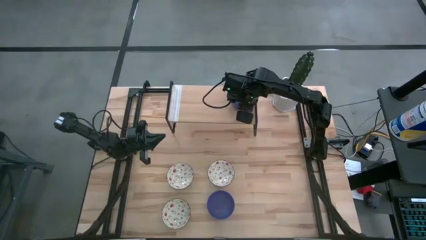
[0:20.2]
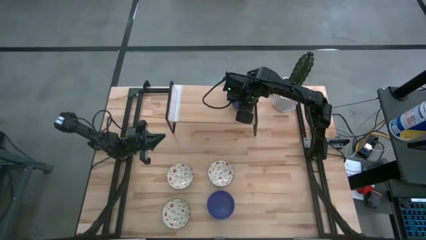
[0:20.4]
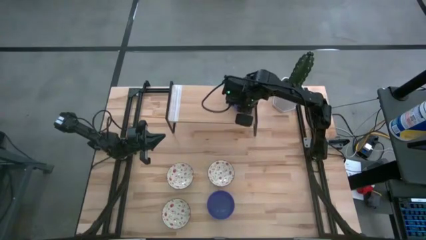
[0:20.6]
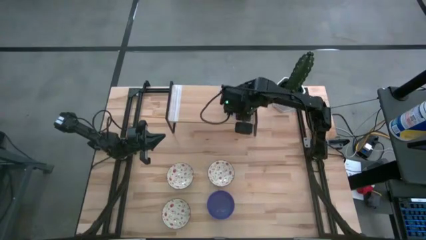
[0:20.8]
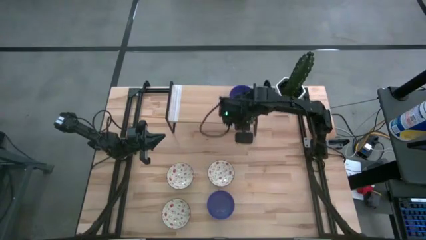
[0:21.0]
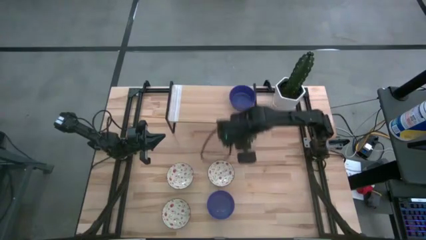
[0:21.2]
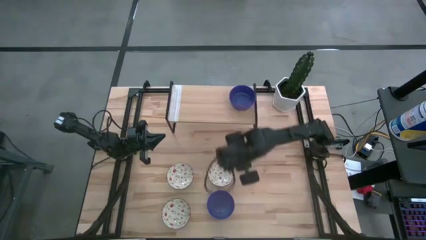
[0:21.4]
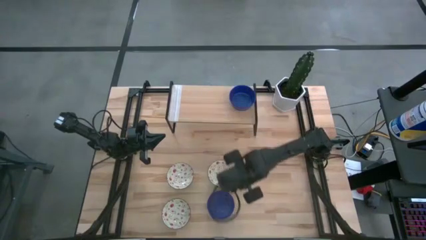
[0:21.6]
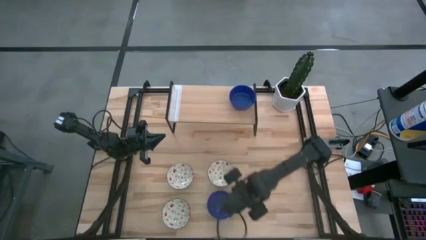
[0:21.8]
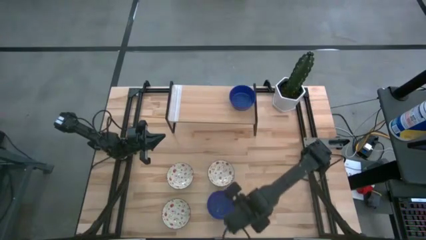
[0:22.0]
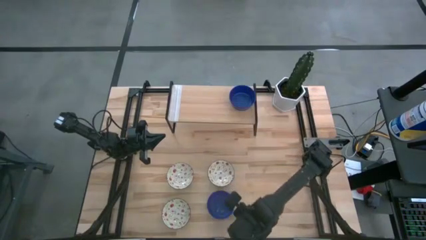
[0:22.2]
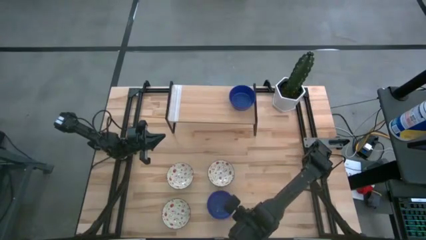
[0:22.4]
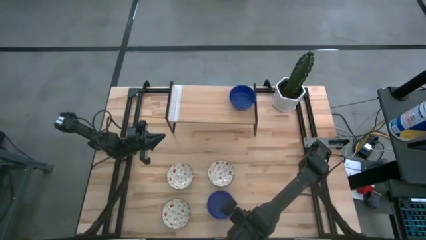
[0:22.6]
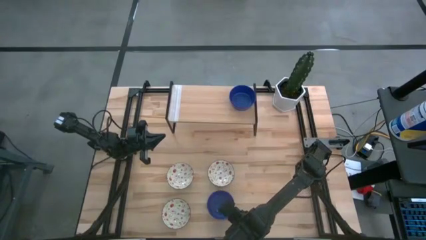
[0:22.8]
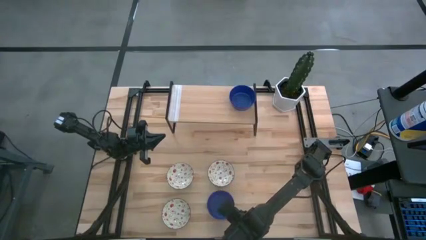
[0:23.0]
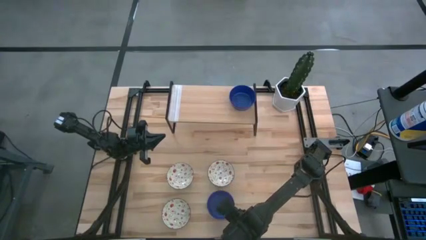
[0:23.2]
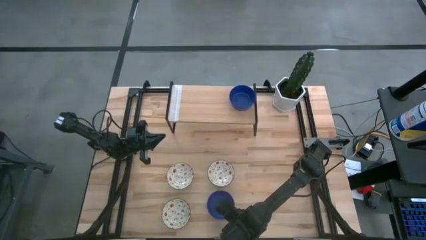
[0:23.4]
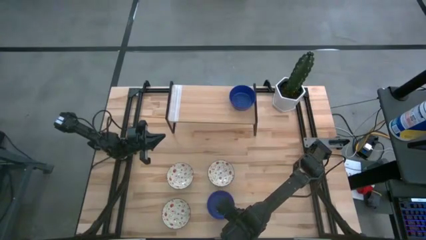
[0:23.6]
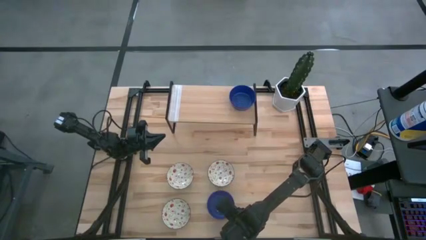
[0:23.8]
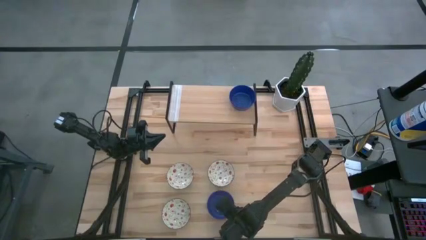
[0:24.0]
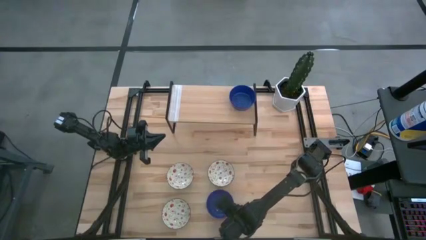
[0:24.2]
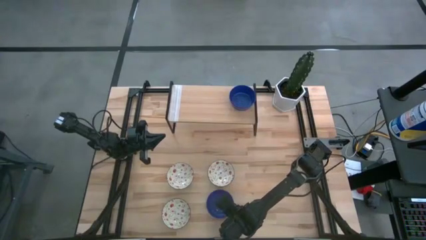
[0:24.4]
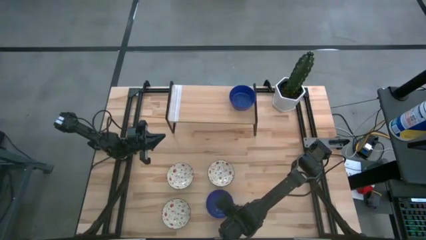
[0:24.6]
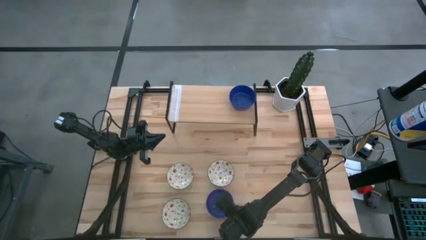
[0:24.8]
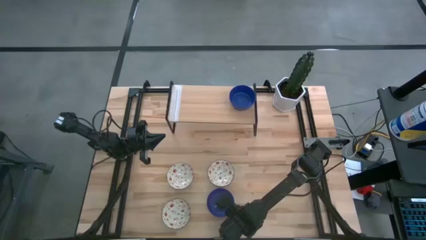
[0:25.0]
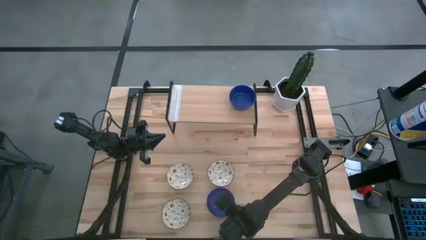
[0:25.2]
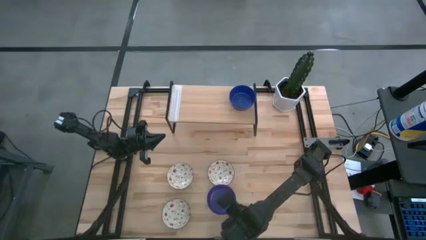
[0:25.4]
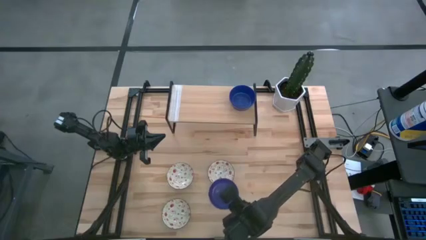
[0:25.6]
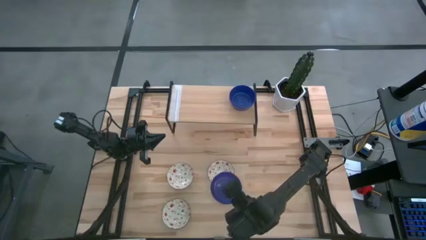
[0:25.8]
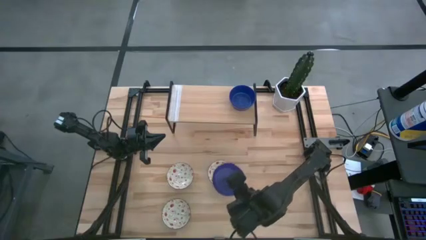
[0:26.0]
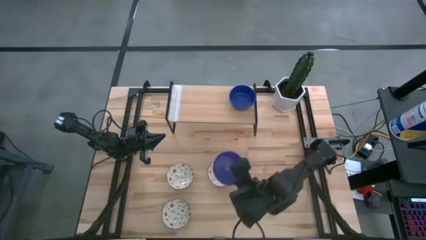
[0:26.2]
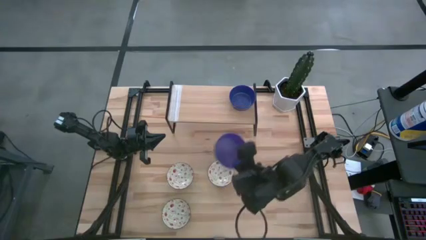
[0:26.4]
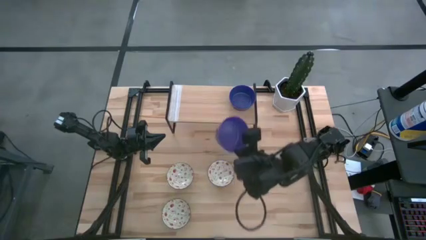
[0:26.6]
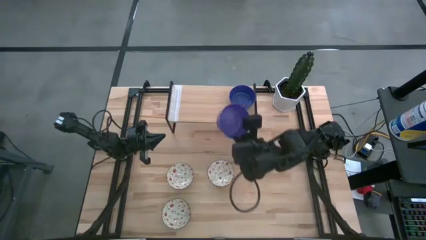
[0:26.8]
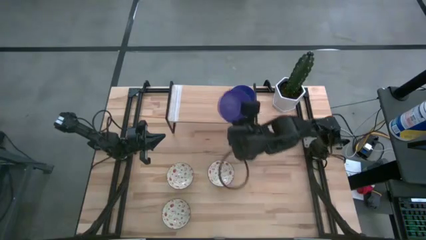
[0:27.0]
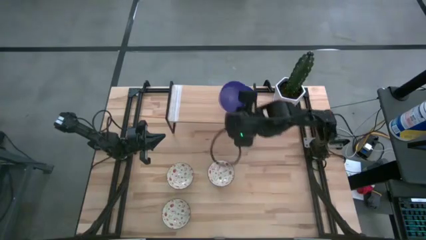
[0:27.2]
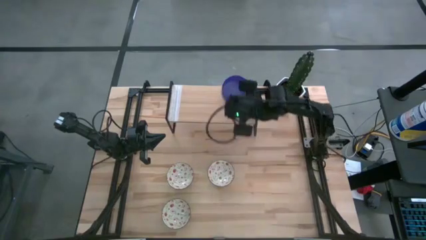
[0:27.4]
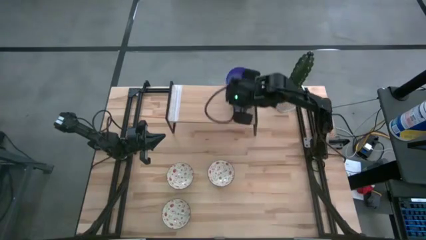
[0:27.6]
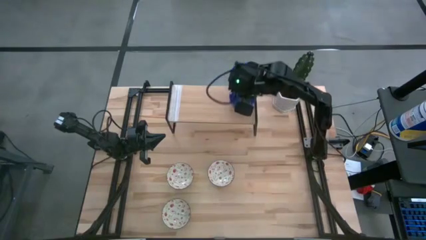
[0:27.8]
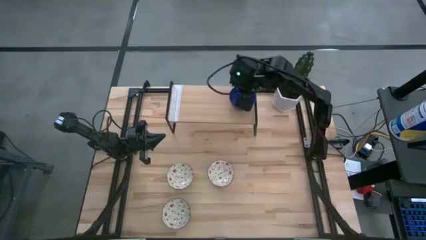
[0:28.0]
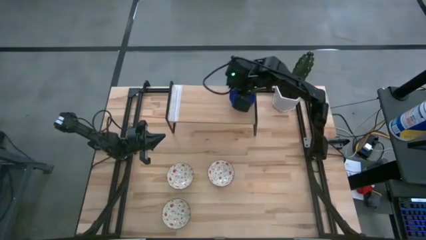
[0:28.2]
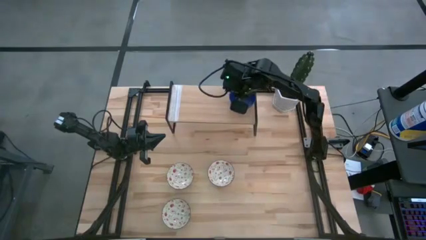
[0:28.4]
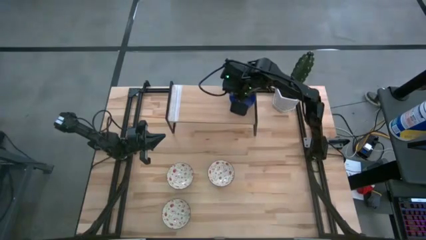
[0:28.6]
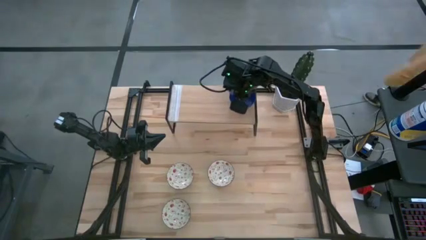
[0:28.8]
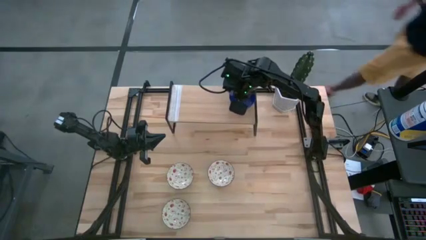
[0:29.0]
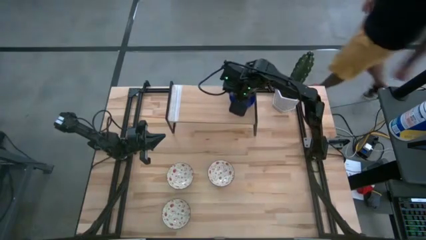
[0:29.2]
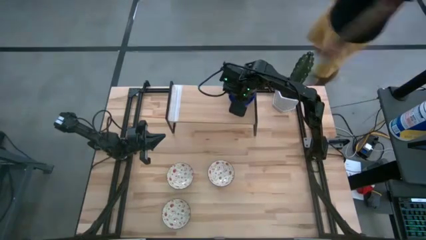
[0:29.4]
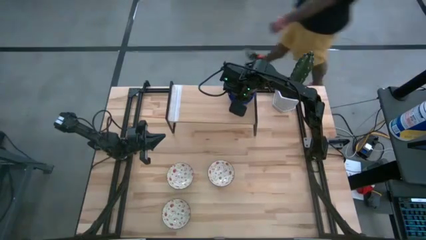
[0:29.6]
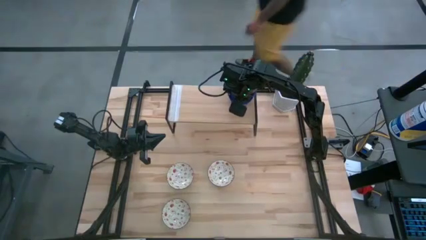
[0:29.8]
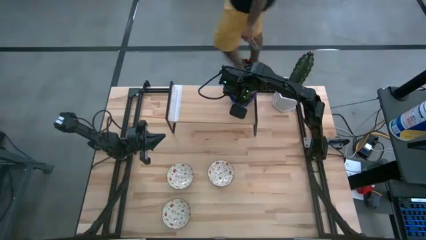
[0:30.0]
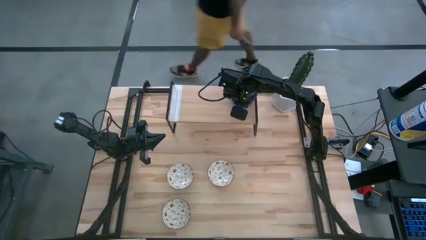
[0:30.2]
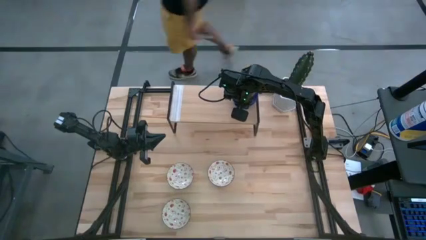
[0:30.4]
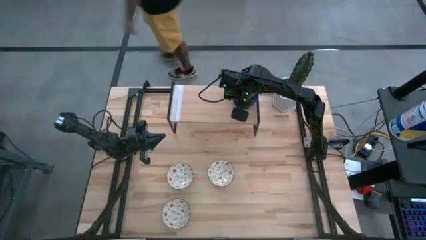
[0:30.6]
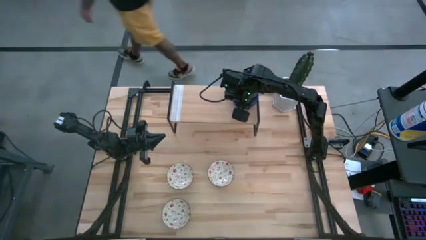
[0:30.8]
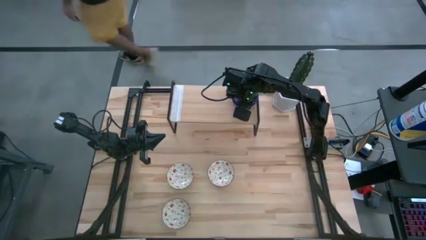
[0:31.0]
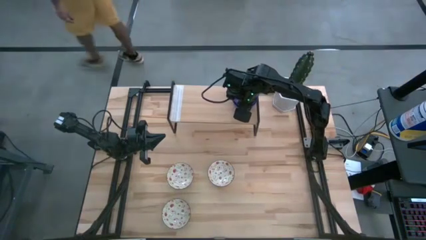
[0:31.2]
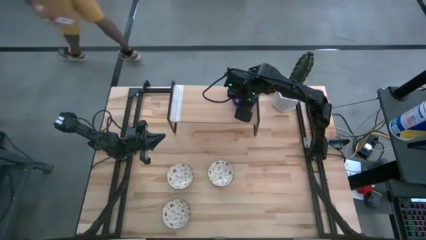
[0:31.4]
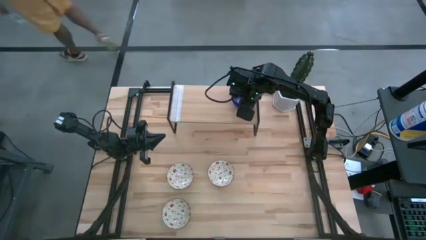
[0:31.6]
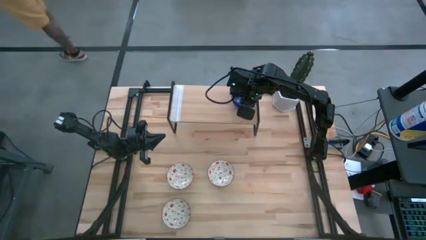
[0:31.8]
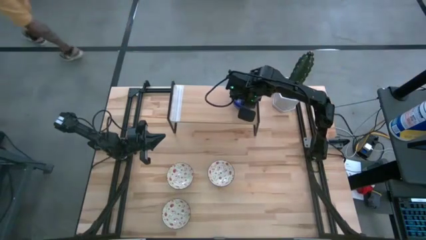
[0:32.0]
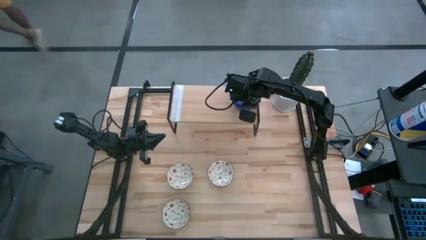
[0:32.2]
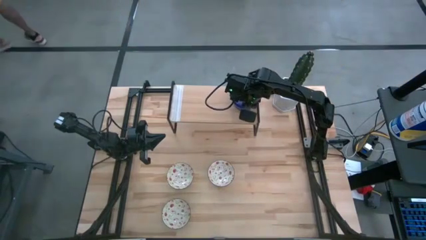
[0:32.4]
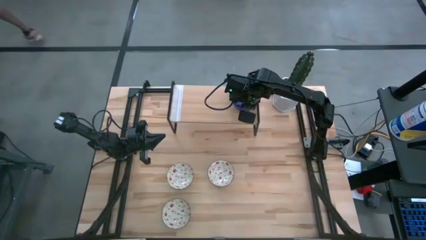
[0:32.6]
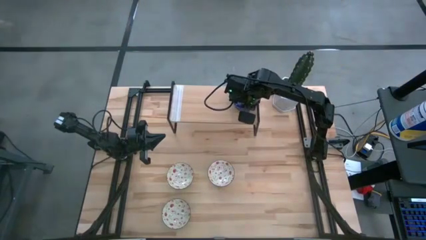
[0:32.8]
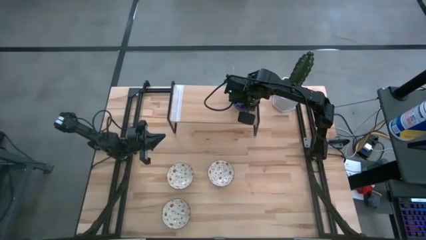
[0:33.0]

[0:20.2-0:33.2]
Task: Pick & Place Mini bowls
Stack the blue bowl on top of the other blue bowl on the shelf

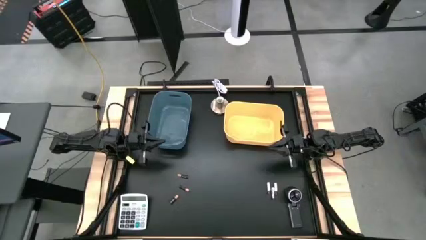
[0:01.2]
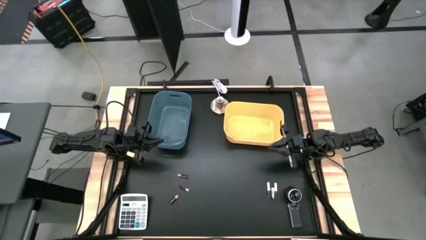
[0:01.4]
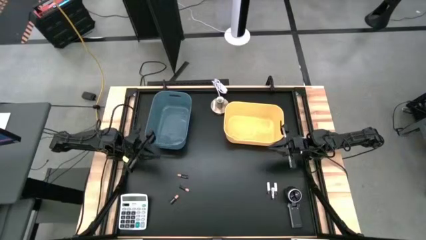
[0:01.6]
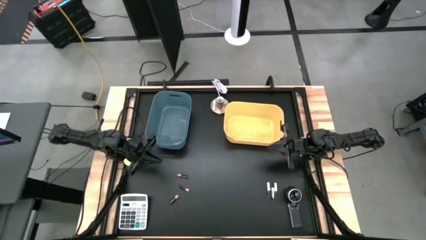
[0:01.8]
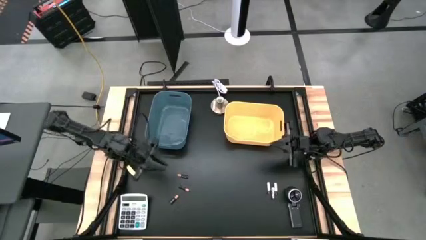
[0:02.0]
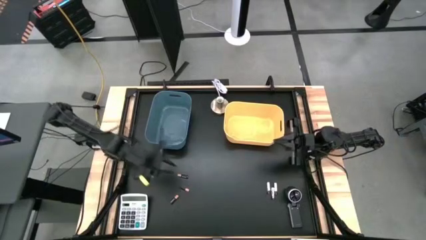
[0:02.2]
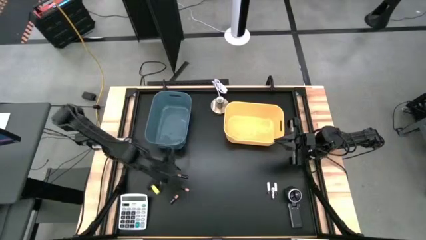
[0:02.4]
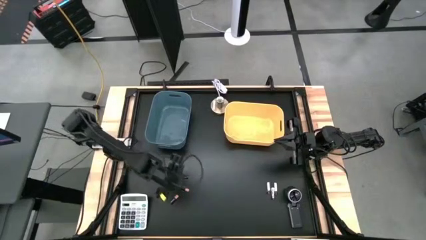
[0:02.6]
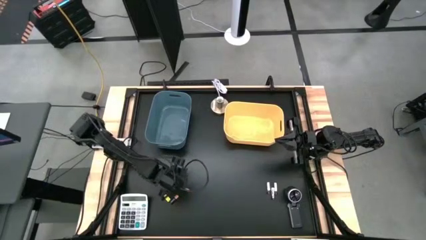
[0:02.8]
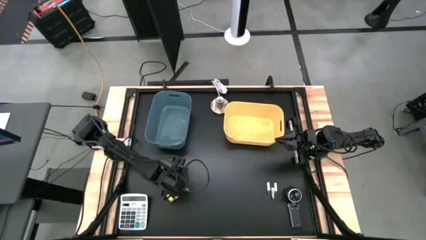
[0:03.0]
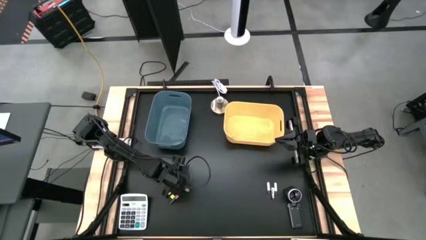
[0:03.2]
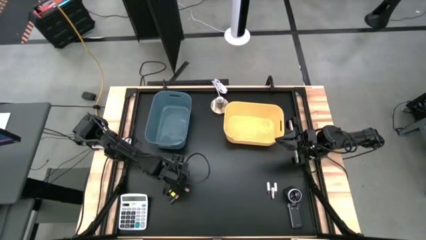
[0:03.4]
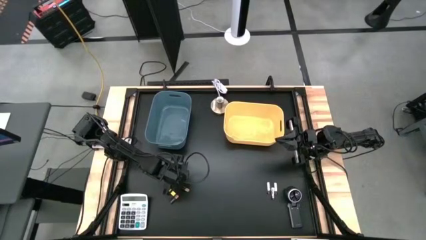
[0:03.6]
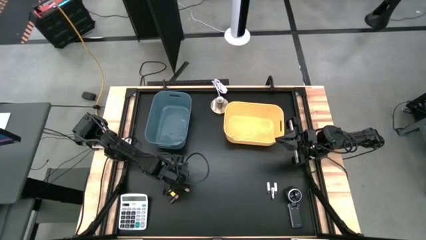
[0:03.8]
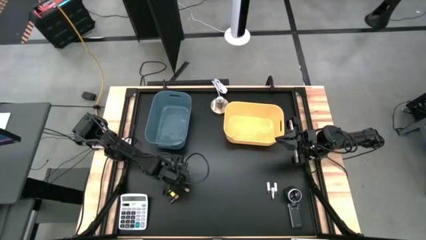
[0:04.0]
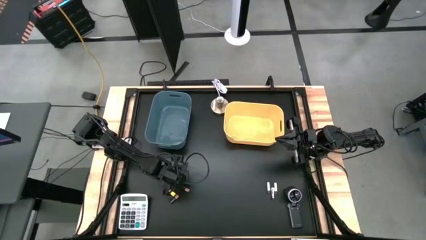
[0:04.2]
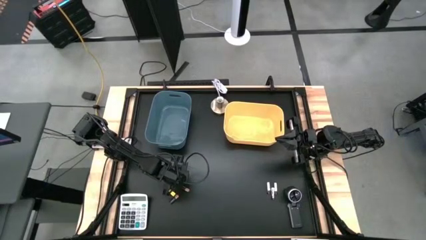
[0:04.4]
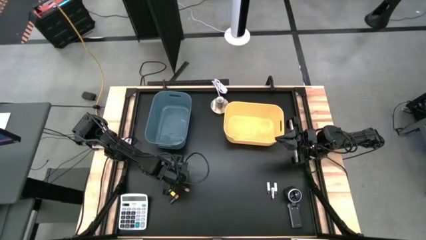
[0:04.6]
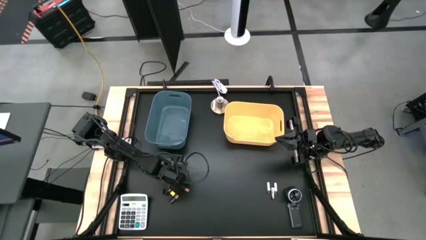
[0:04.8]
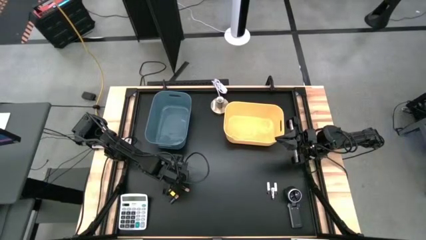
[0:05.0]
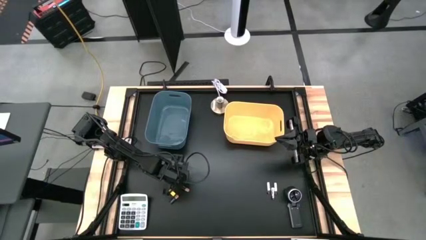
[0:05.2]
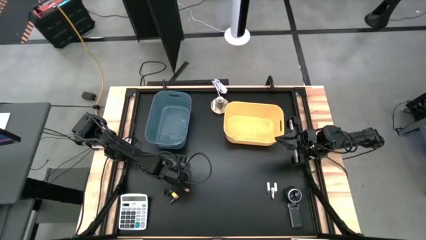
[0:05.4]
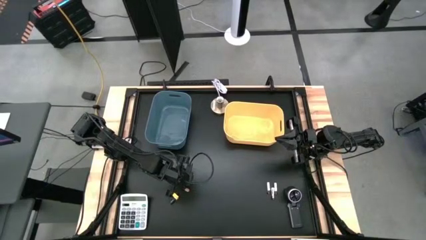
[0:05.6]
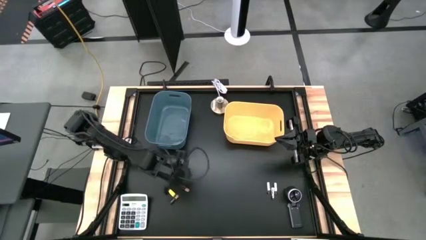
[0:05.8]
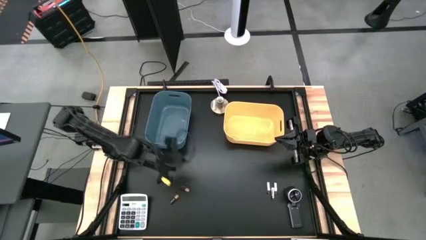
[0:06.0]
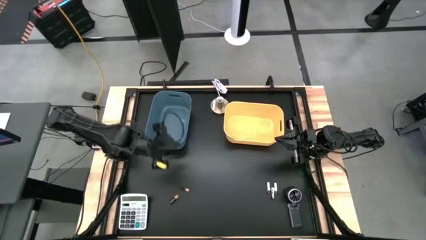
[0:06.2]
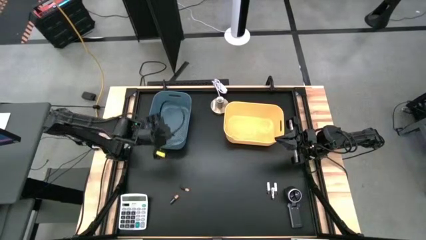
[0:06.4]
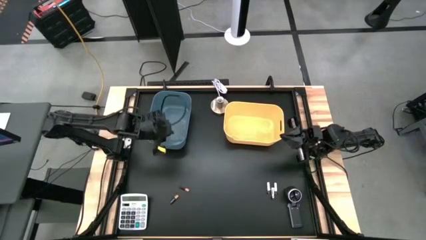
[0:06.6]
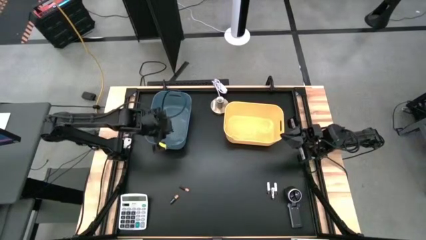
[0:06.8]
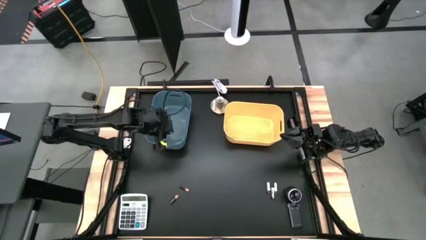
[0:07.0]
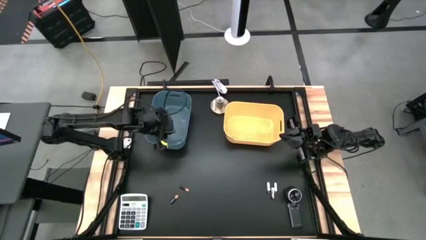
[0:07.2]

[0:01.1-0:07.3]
Task: Sort batteries
Put the top black battery into the blue bin
